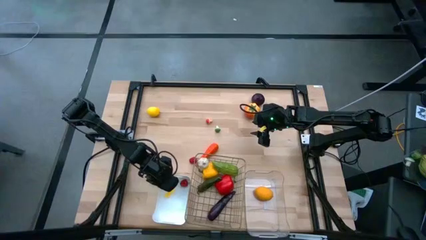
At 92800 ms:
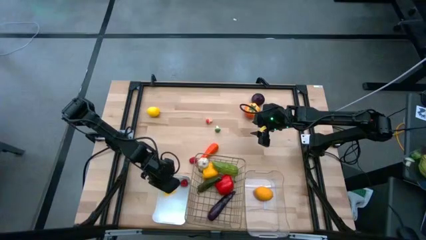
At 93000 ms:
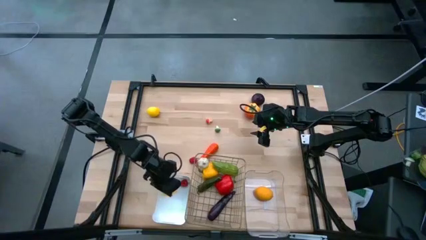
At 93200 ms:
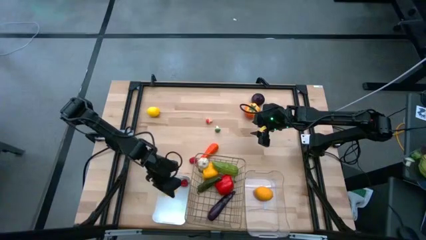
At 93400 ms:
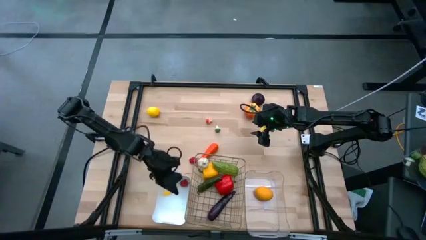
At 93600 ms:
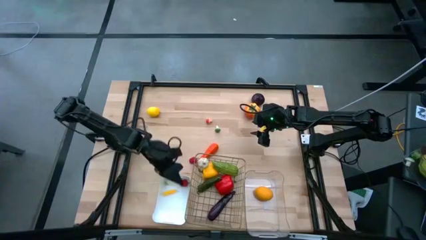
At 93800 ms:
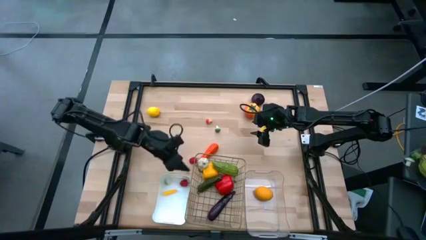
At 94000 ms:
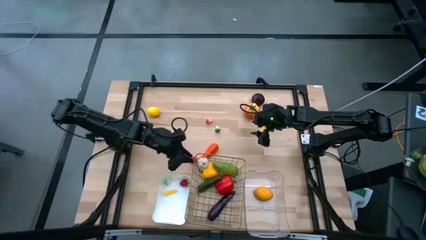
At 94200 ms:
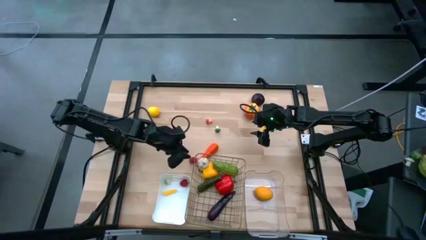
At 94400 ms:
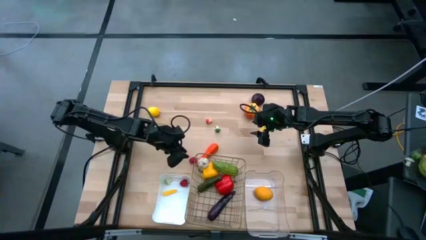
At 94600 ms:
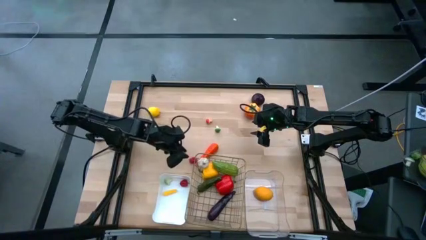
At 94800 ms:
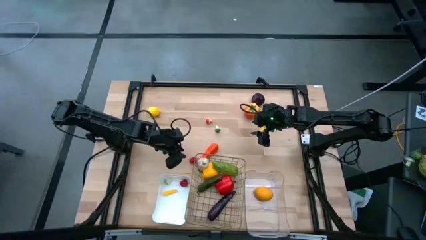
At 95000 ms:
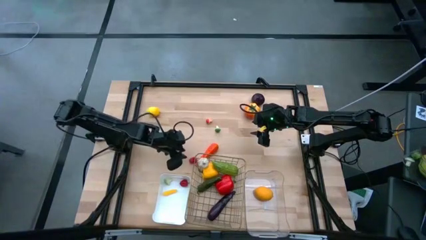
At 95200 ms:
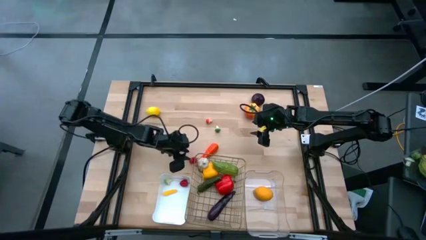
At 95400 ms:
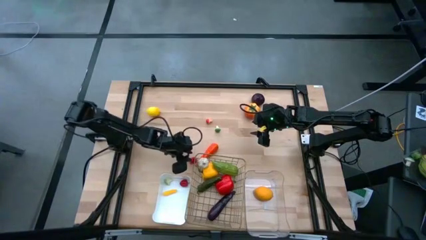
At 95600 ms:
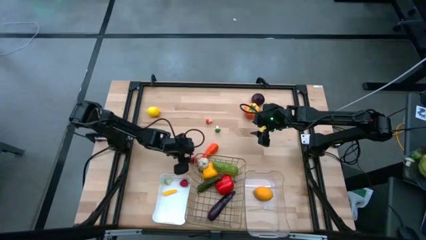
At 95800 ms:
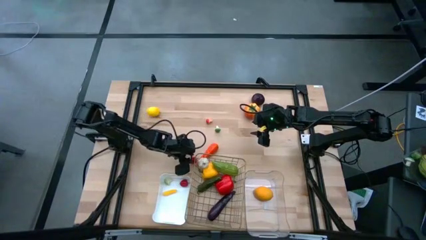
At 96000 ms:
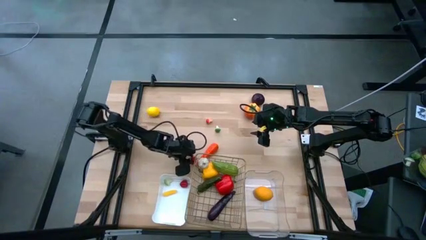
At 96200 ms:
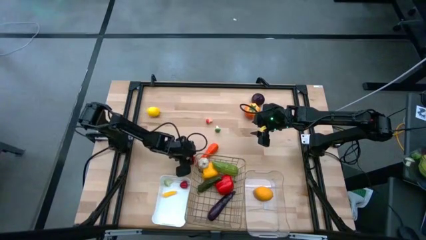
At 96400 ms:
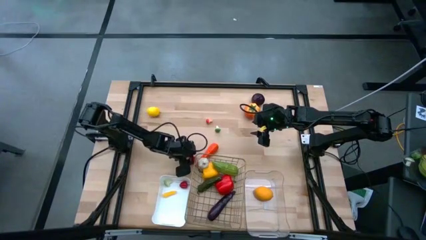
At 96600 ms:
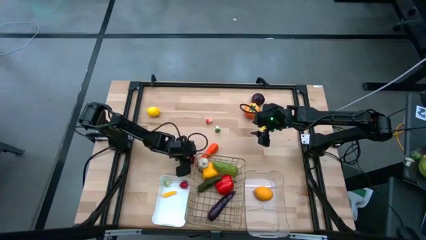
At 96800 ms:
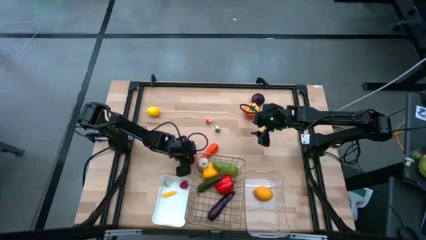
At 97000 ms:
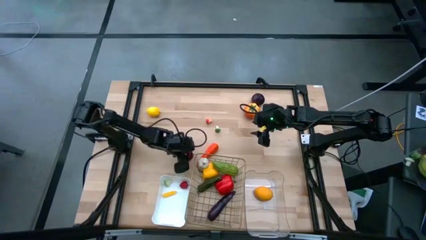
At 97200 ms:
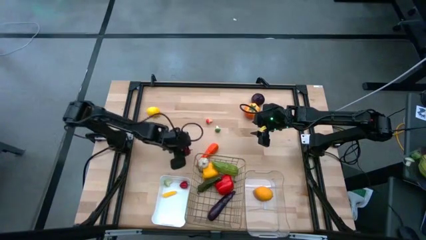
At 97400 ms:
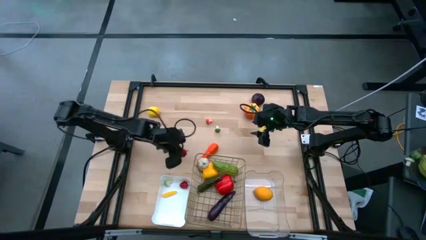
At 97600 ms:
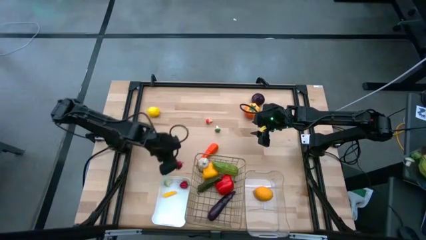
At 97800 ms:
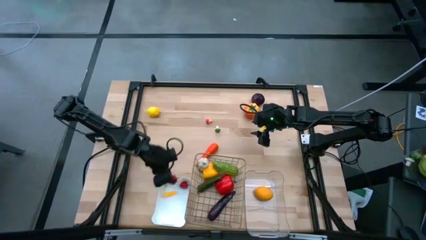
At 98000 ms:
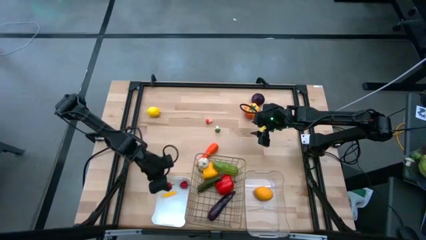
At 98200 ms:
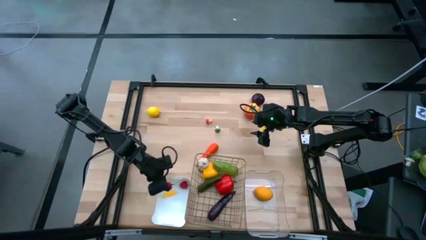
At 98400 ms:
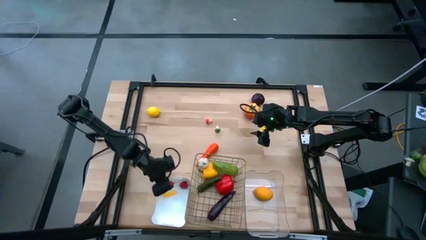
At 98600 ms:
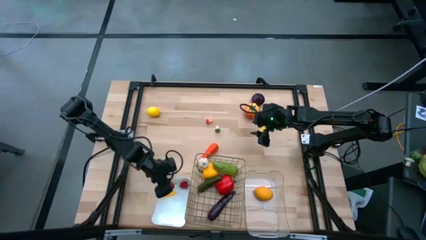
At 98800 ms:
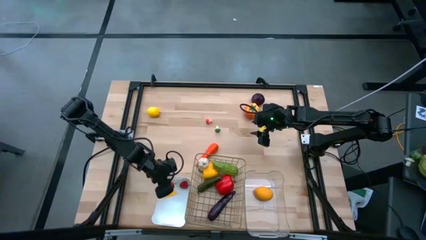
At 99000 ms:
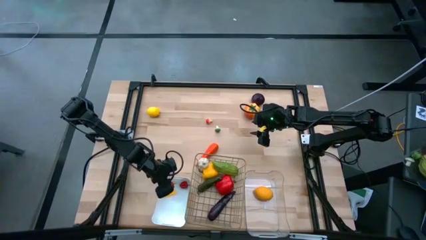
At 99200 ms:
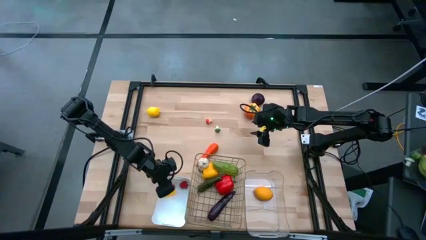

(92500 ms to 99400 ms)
Task: Sort produce into baskets
Put the small red bell pepper into the white bin

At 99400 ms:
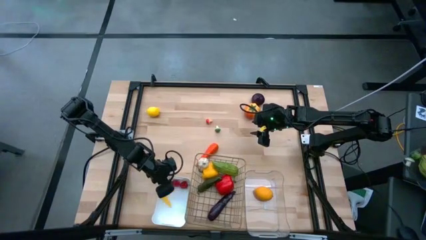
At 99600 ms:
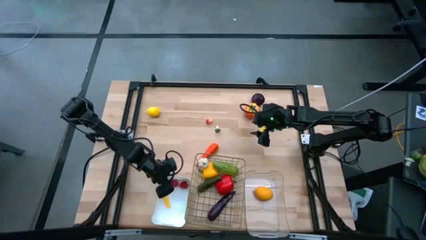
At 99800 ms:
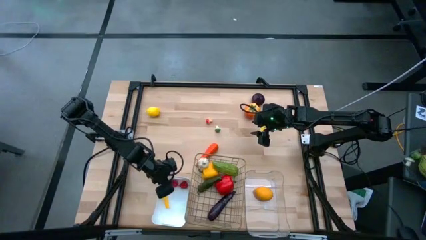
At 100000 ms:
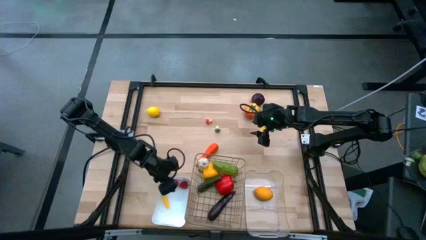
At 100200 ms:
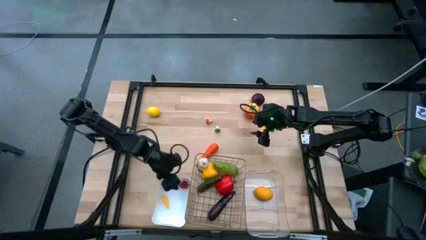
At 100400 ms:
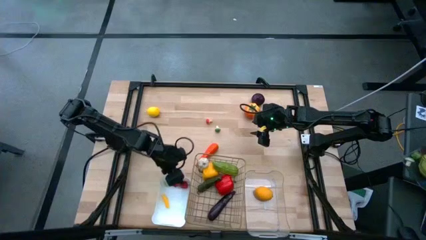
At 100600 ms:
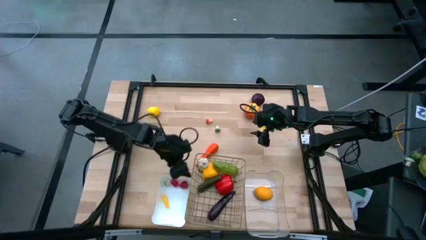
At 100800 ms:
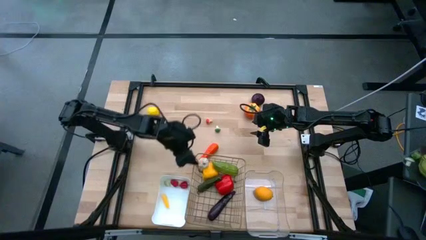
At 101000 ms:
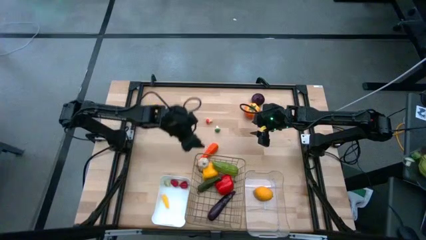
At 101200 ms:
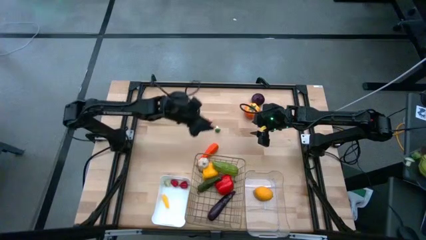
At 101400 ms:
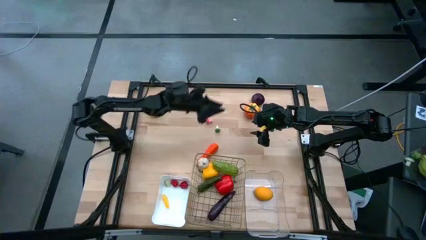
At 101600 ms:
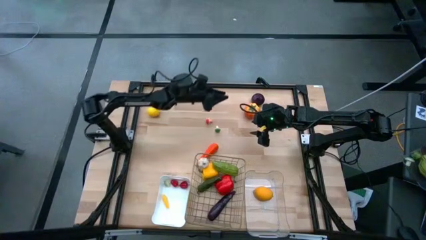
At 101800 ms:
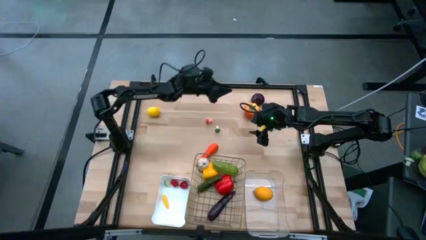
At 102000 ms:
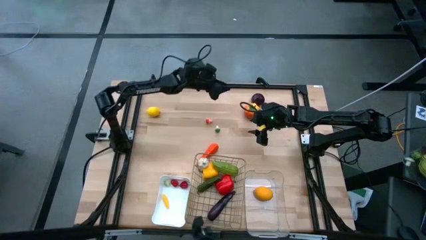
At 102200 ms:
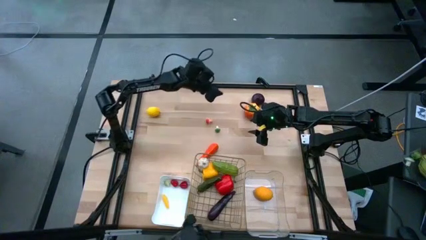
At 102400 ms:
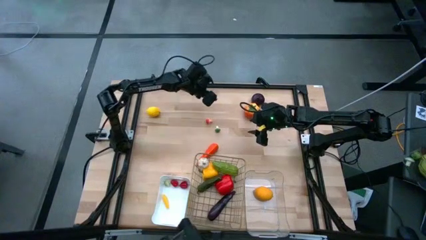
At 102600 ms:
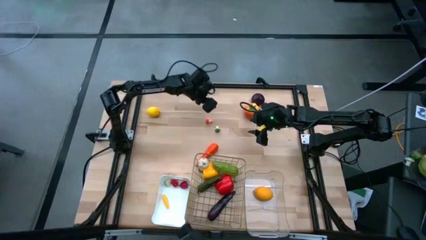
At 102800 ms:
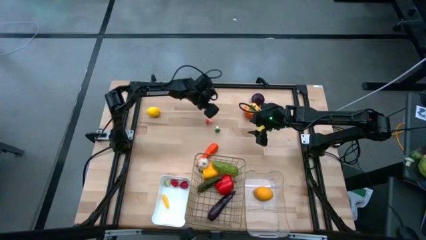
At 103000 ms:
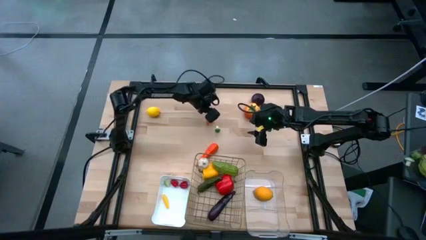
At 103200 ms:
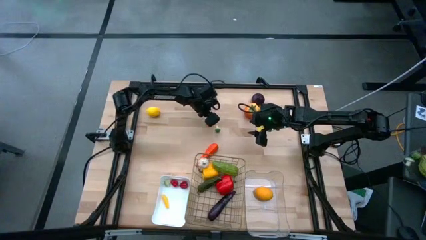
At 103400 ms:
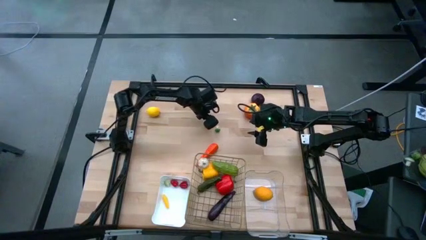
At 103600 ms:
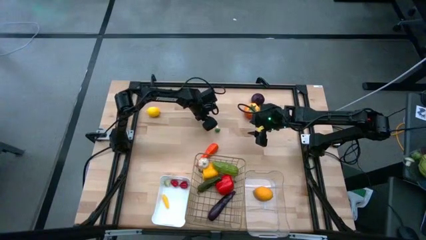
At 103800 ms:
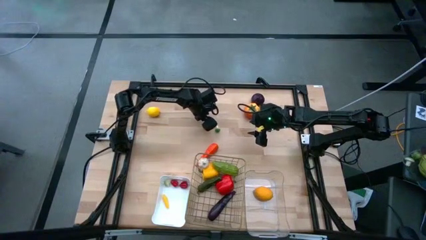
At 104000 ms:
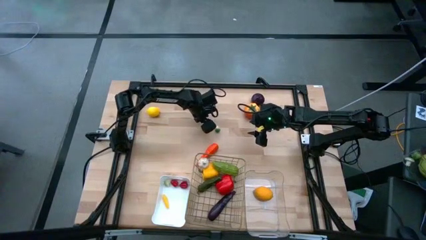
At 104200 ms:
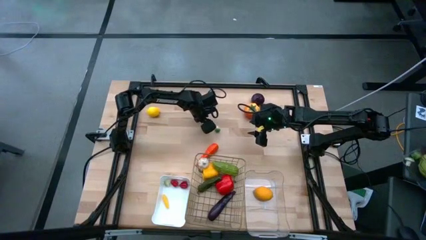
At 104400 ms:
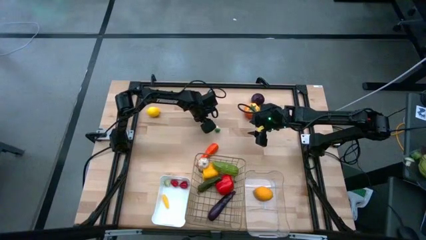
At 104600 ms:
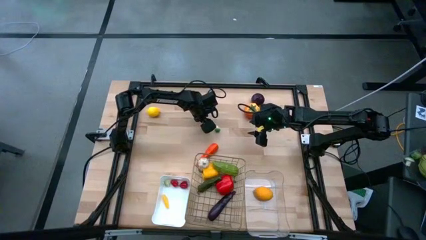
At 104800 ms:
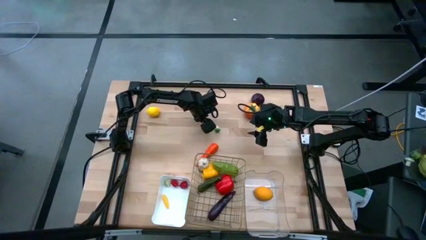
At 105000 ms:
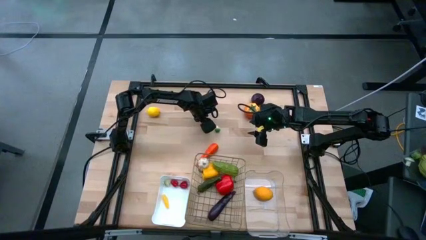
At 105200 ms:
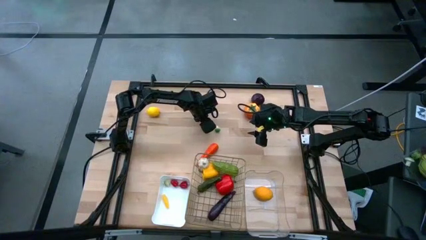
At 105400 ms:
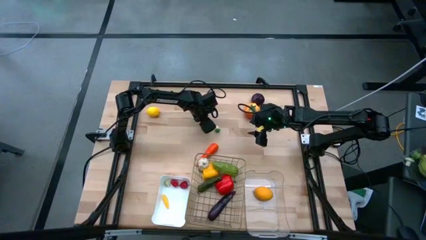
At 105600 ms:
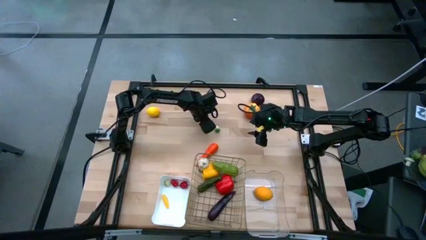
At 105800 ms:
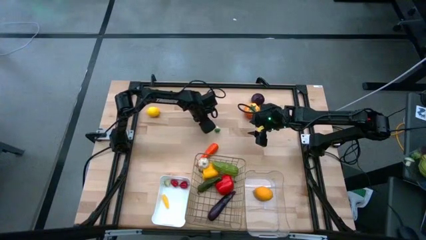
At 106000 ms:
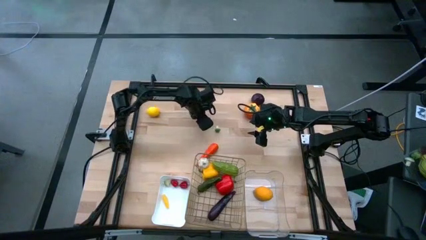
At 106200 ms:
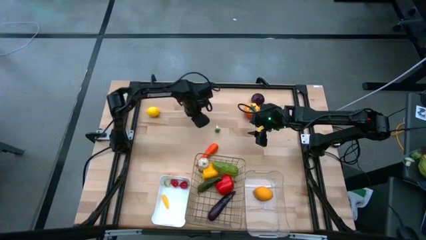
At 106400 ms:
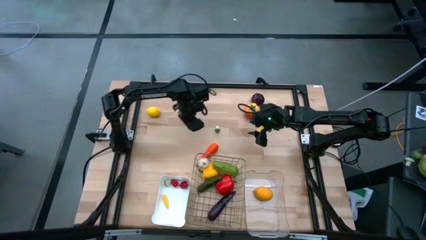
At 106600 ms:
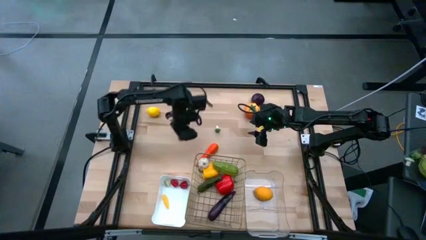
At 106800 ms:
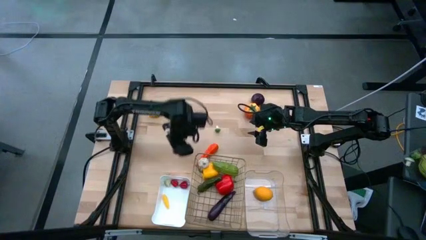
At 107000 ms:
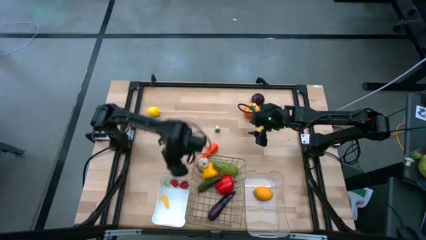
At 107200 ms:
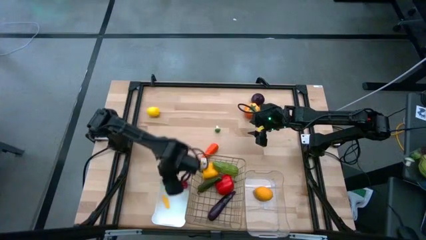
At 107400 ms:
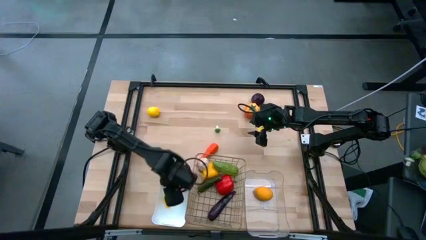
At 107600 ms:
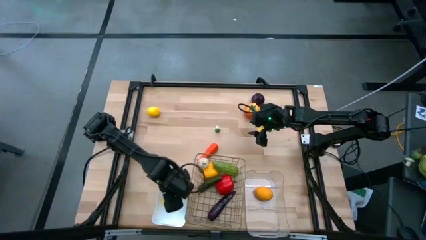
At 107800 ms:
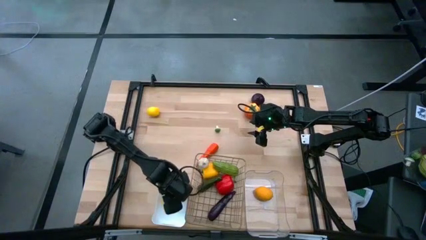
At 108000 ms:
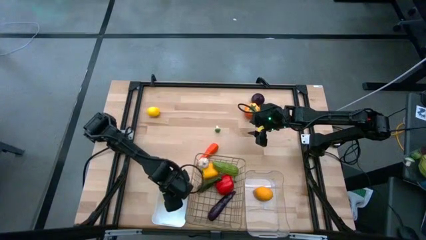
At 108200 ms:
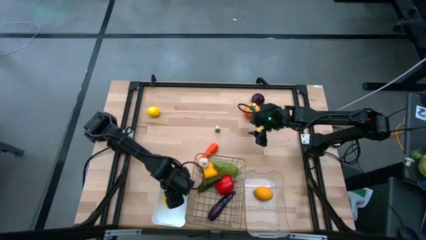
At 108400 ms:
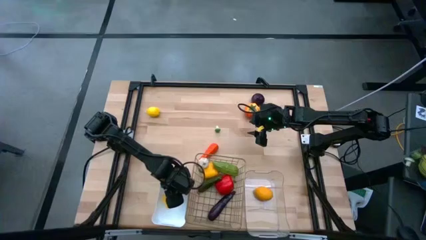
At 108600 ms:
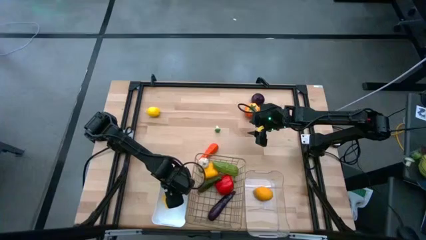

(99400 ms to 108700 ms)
Put the orange mushroom into the white bin
